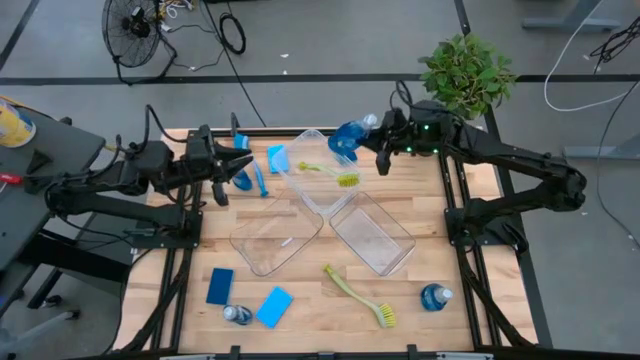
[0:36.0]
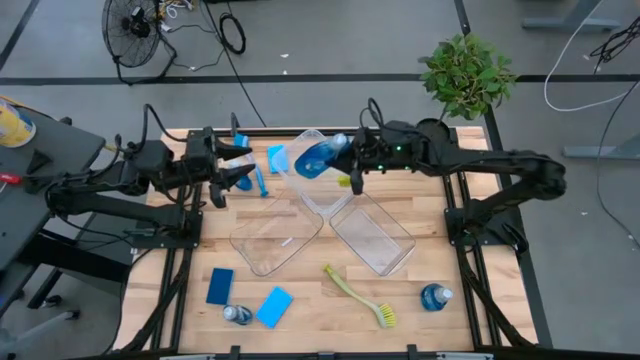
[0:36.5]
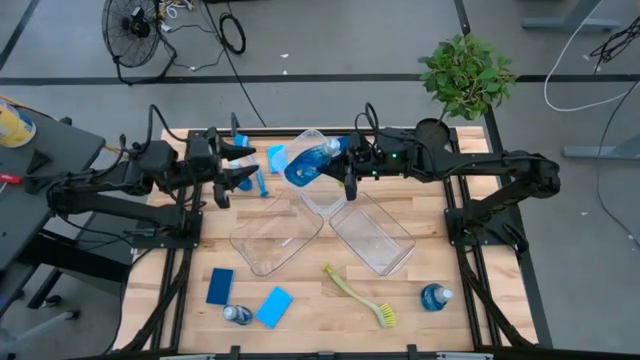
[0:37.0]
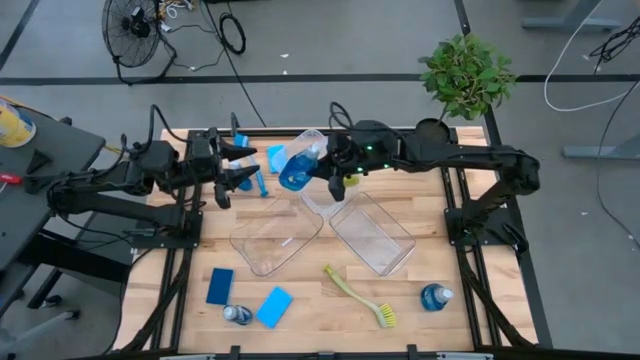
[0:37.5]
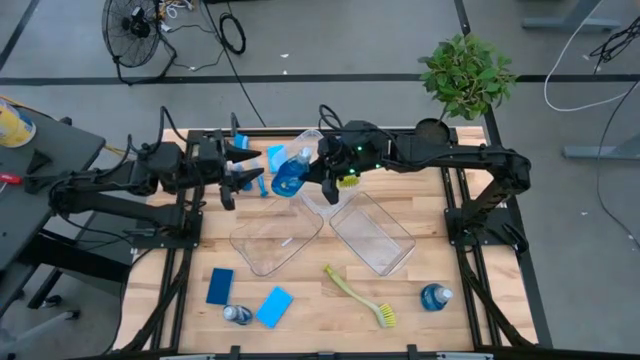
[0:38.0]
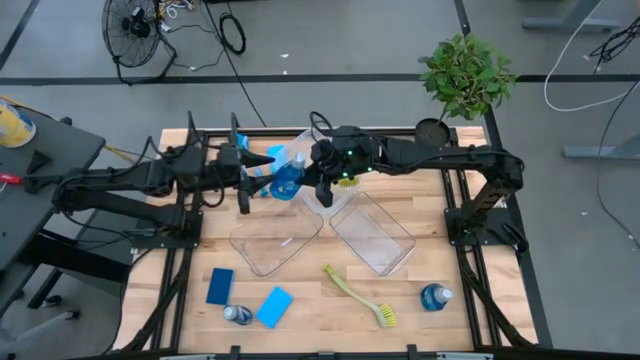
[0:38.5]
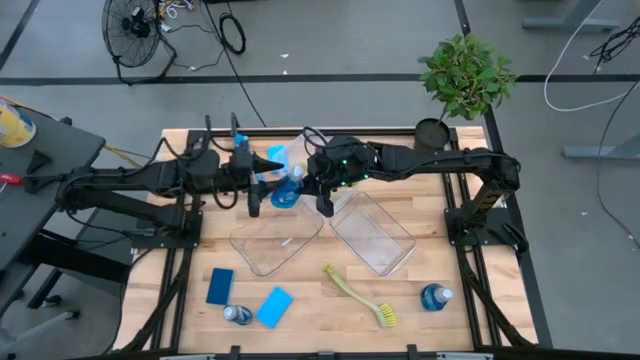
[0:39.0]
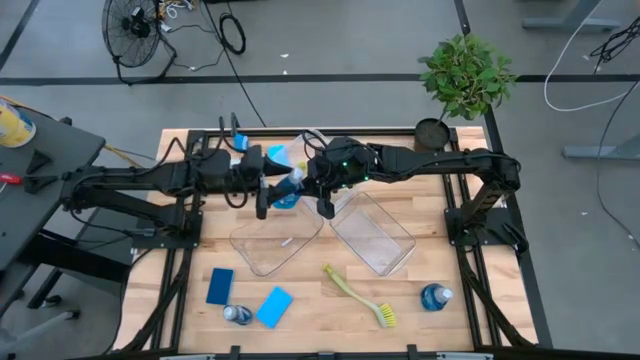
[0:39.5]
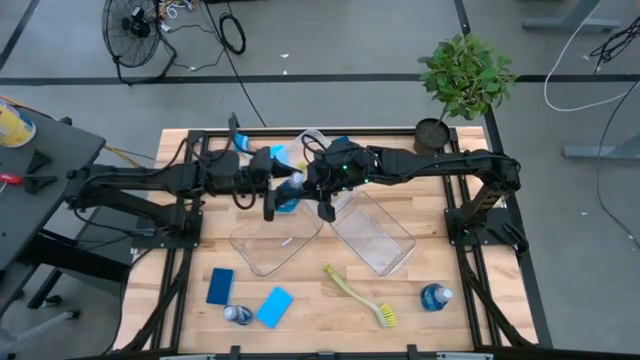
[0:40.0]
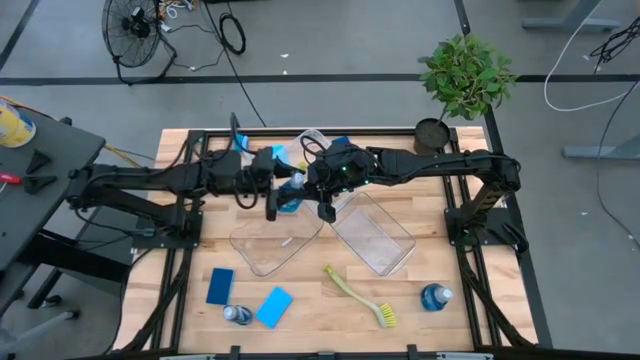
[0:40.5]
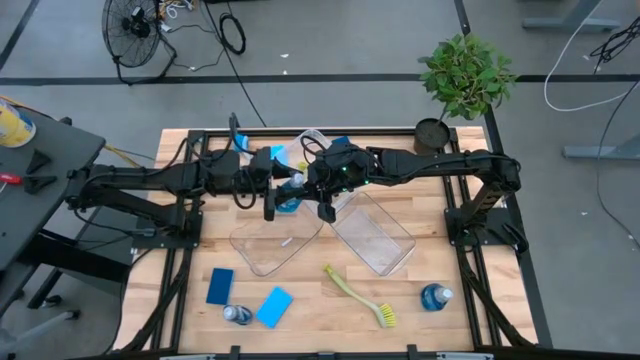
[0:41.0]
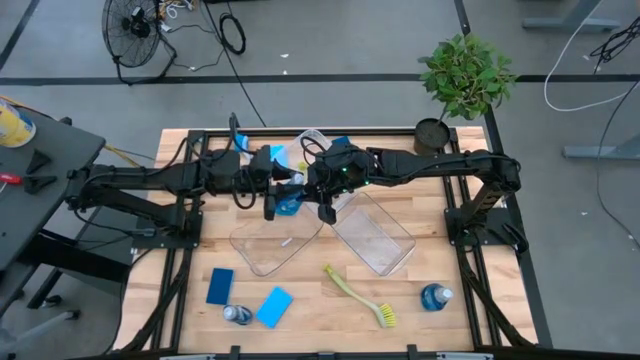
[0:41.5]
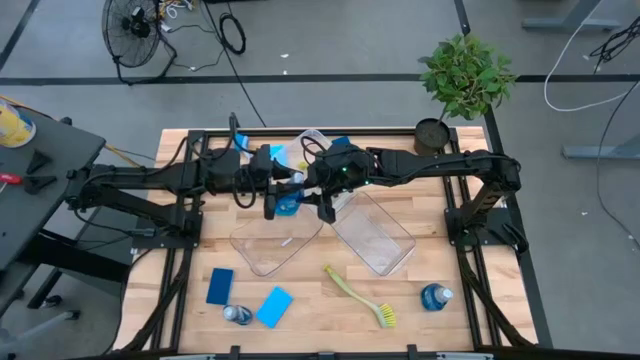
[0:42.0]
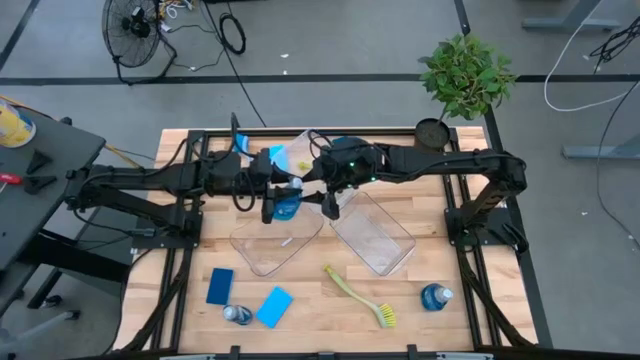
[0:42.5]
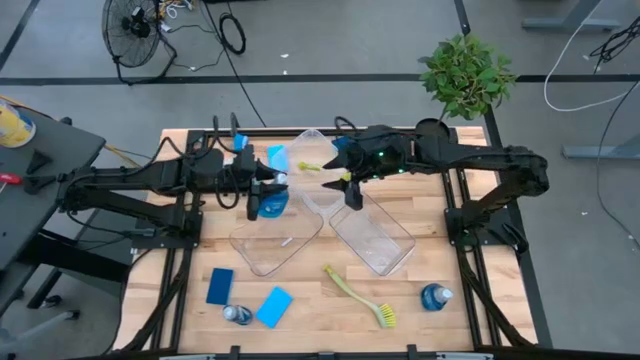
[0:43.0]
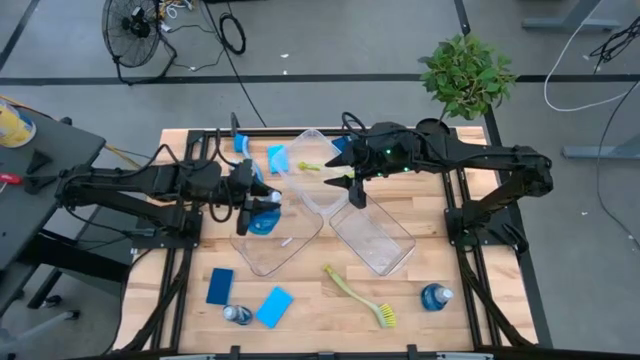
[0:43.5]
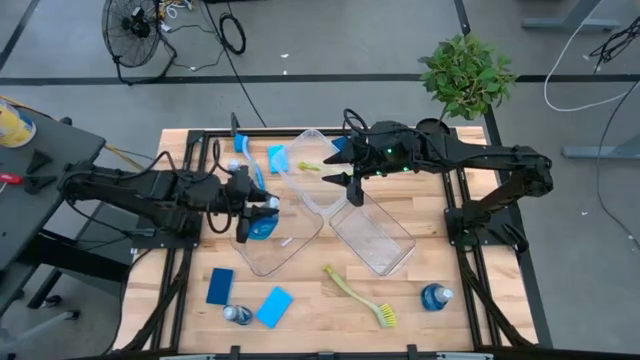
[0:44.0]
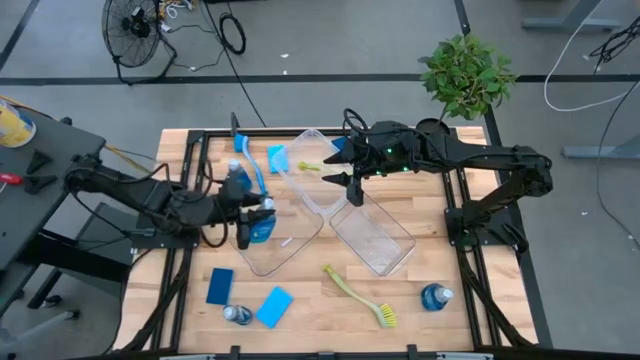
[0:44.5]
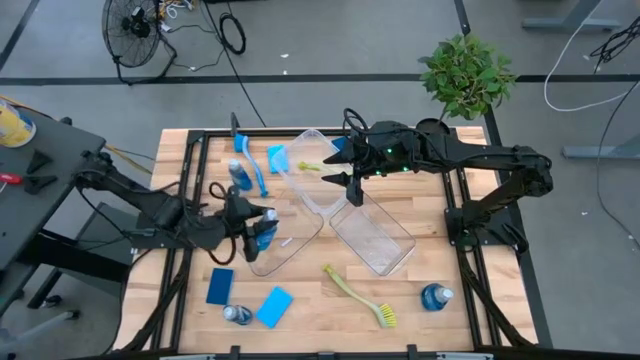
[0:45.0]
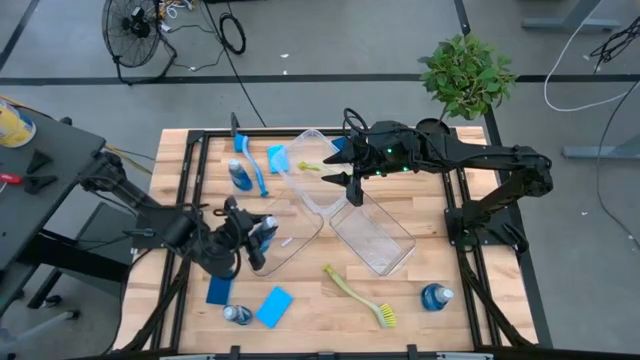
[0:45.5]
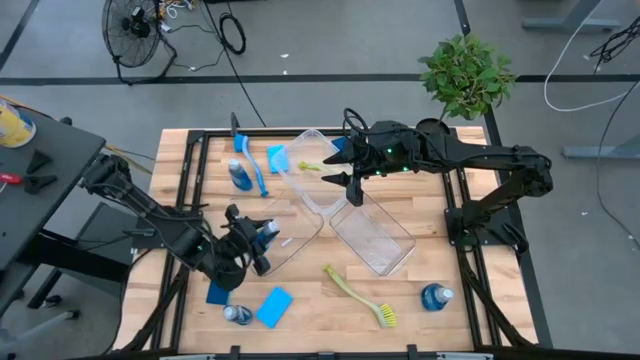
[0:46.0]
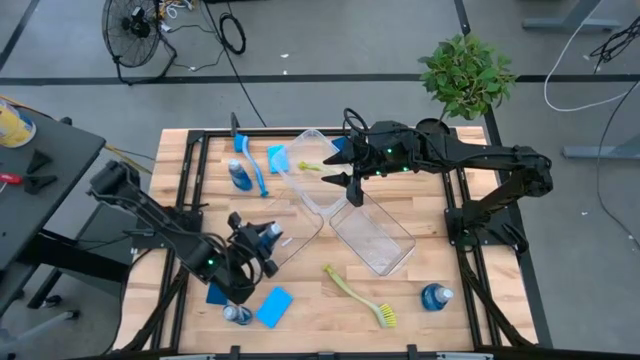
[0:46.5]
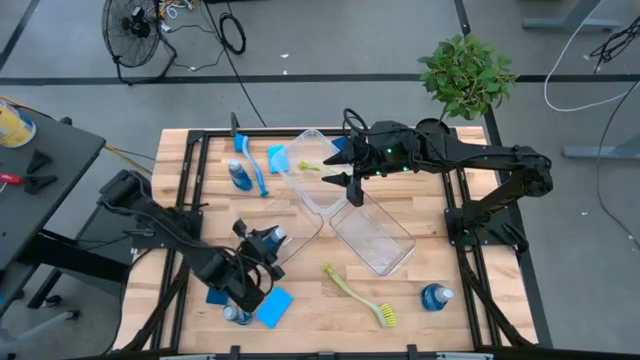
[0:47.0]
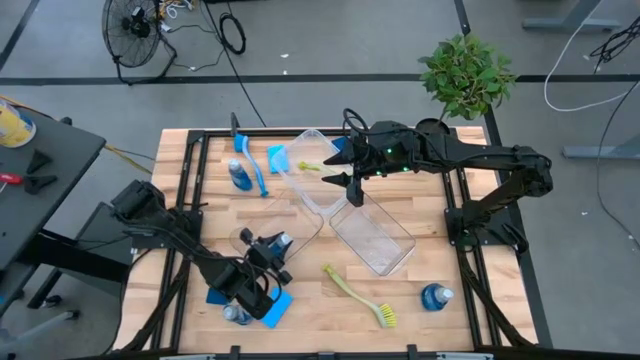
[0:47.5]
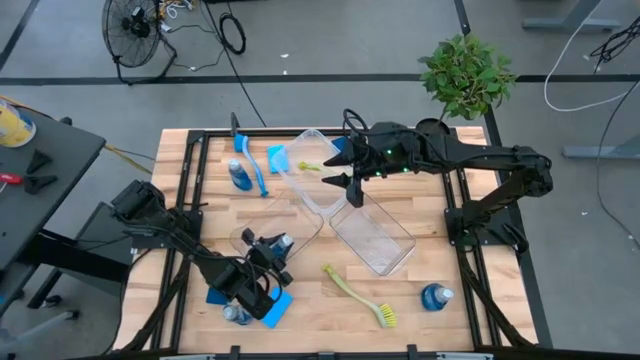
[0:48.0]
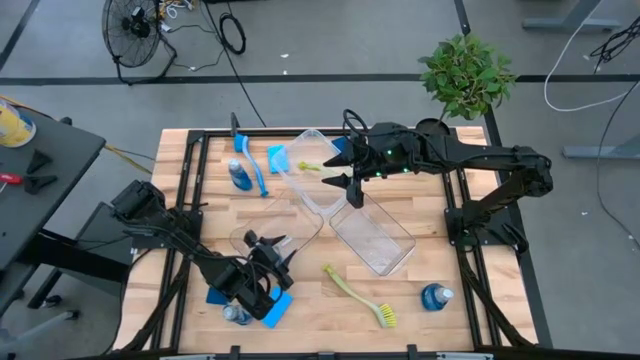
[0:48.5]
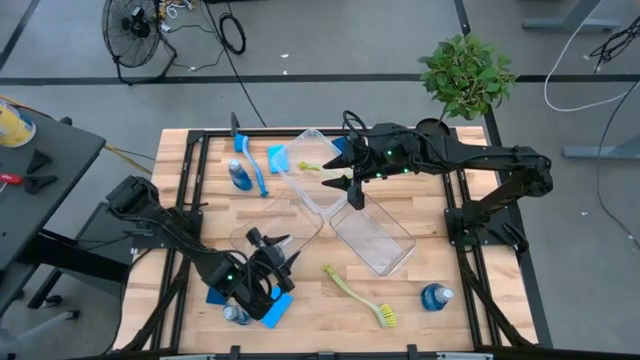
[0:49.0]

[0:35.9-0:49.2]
Task: Pick & Place Kitchen Sink Supplies
Put the blue dishwashing liquid into the left transparent bin

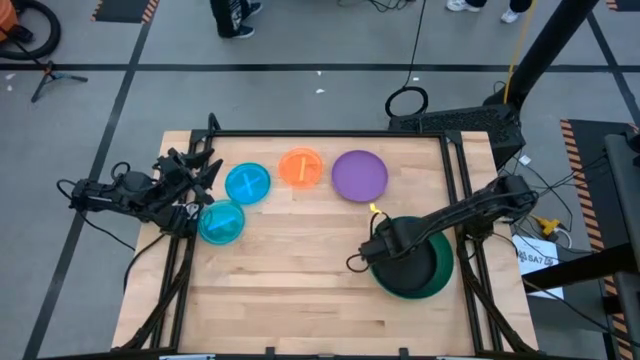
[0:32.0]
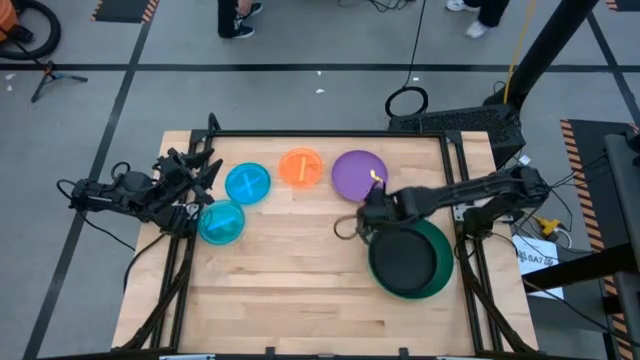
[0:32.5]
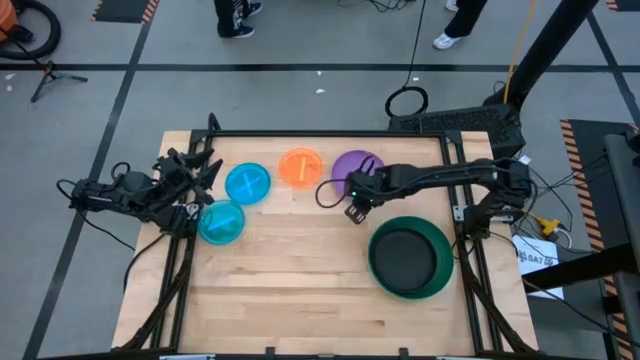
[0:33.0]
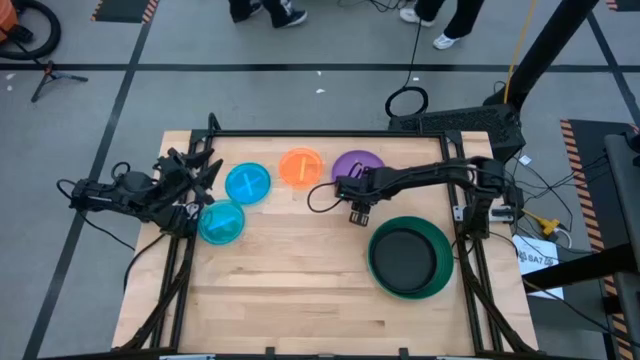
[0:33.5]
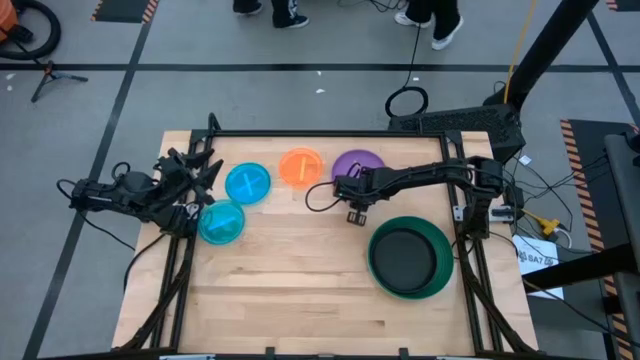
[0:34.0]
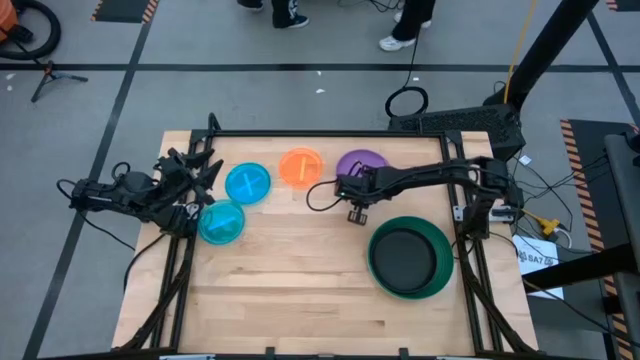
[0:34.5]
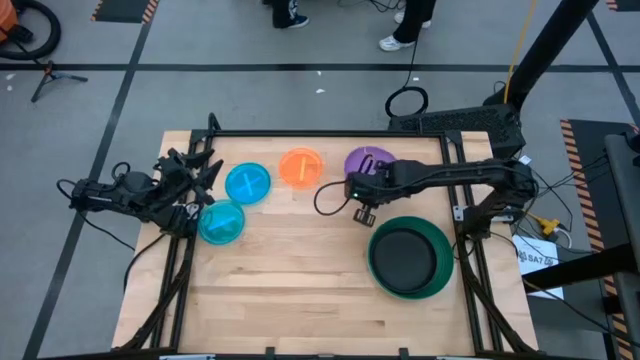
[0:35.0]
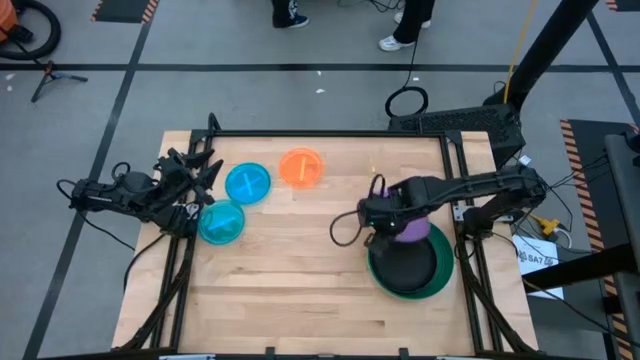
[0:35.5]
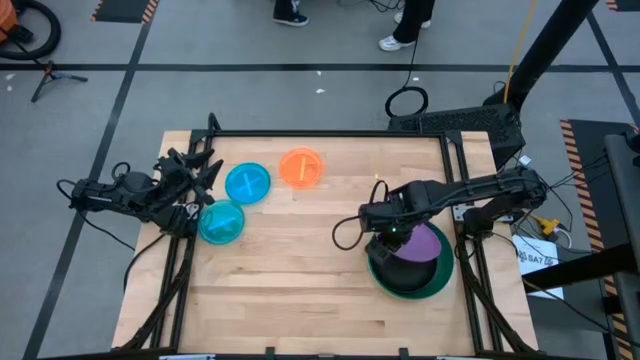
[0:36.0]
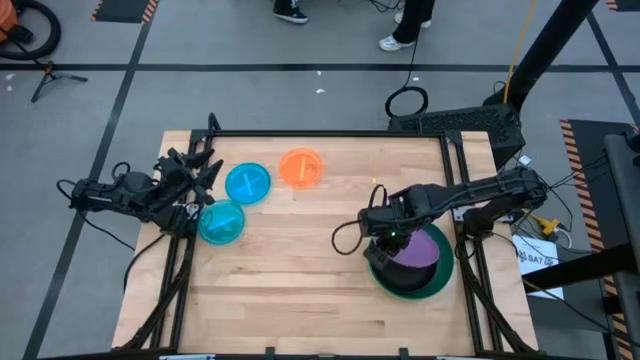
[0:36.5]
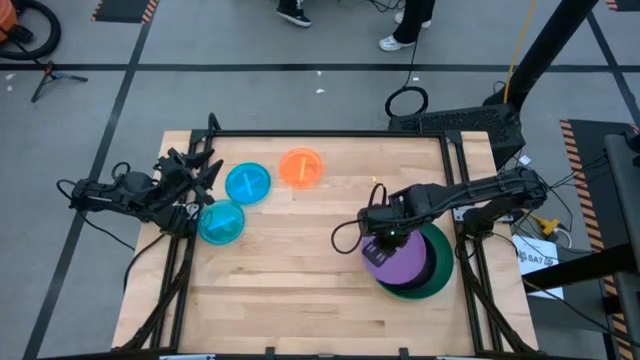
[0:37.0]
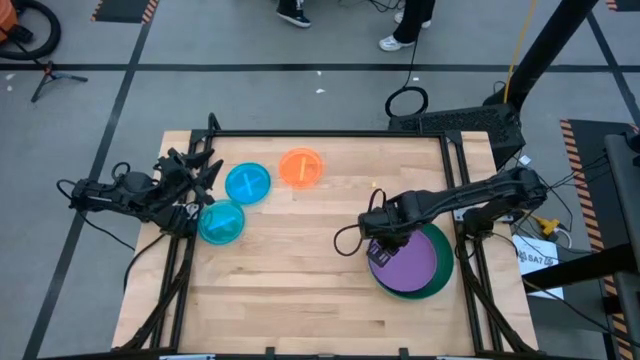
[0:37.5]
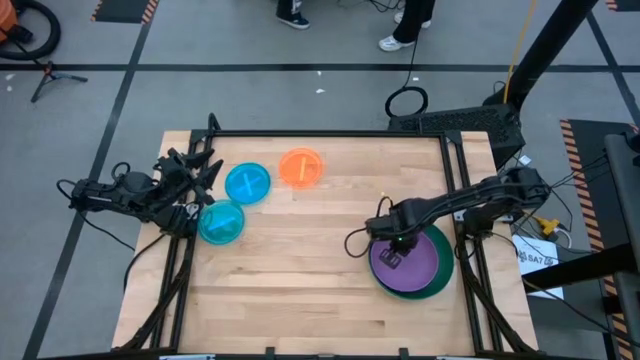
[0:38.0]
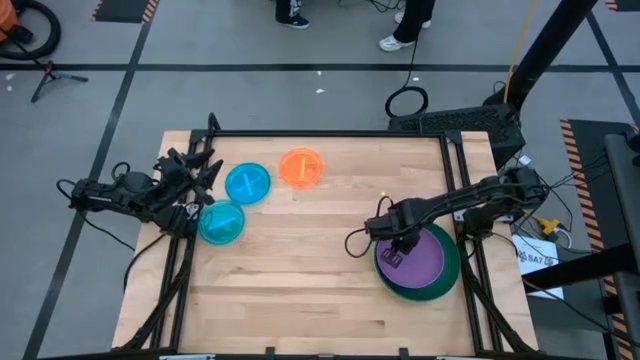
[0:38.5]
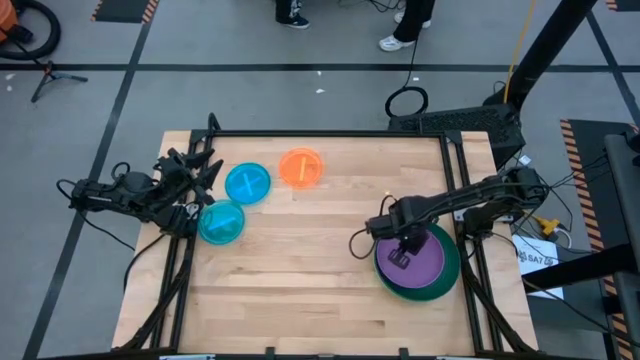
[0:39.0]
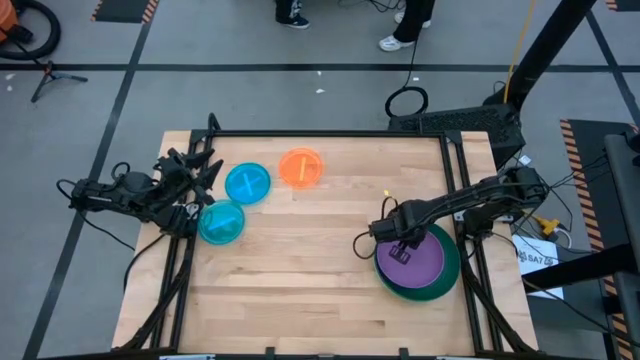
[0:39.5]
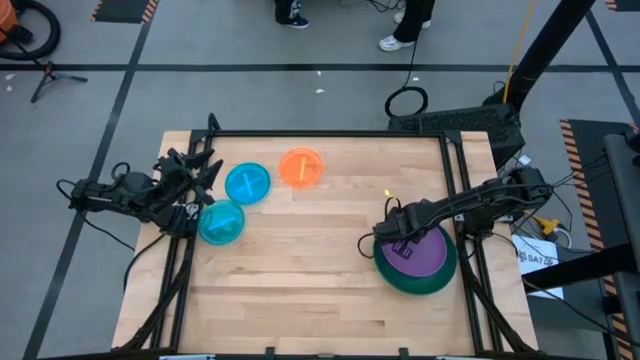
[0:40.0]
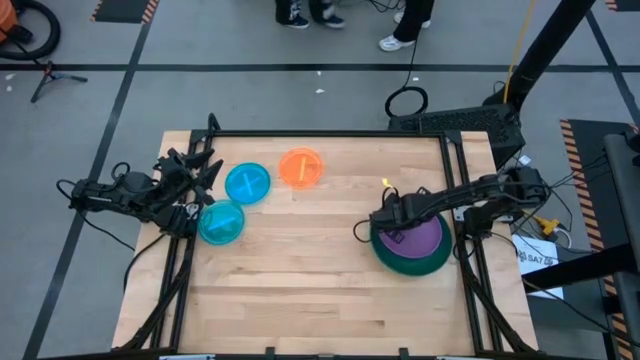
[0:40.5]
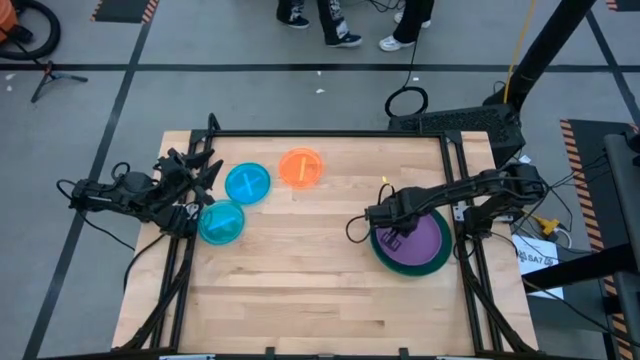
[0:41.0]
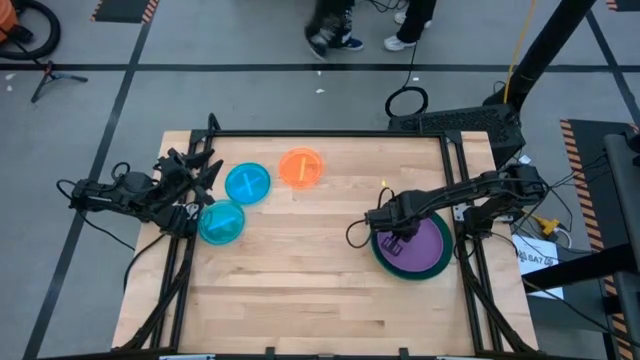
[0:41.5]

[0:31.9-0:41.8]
Task: Stack plastic plates
Stack the purple plate on top of the the black plate
